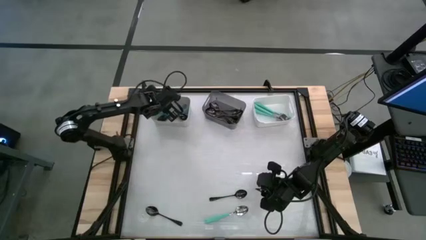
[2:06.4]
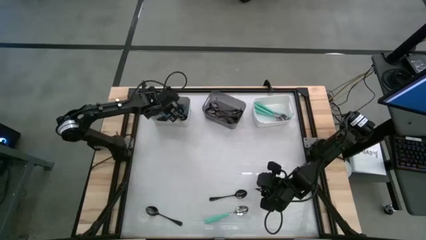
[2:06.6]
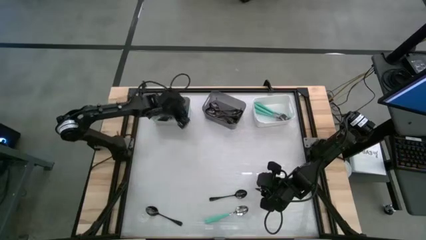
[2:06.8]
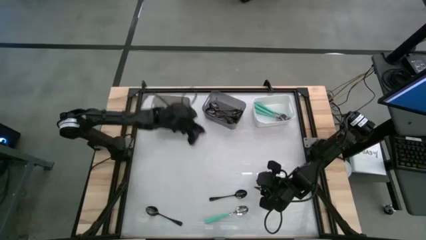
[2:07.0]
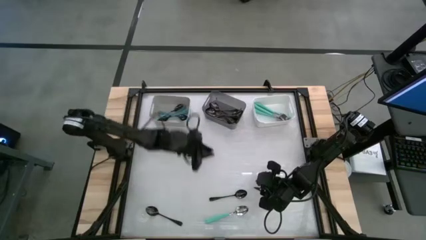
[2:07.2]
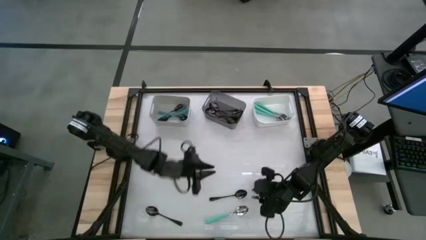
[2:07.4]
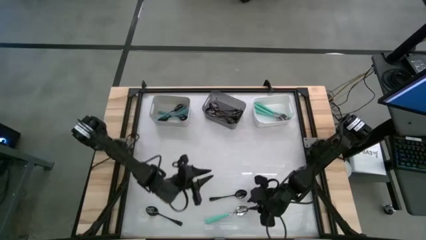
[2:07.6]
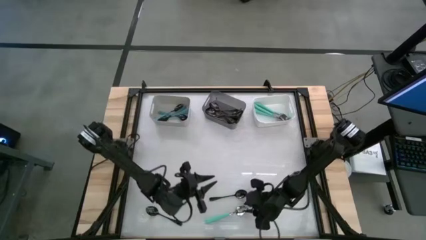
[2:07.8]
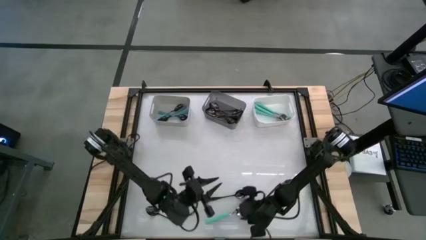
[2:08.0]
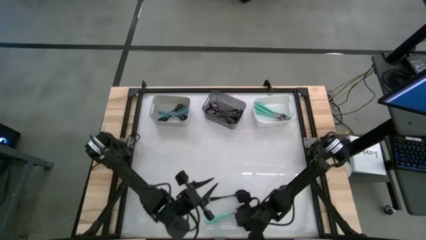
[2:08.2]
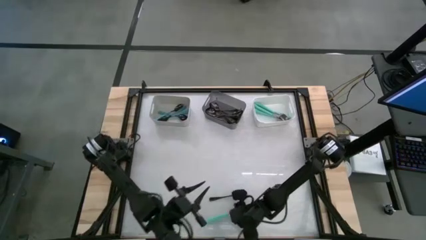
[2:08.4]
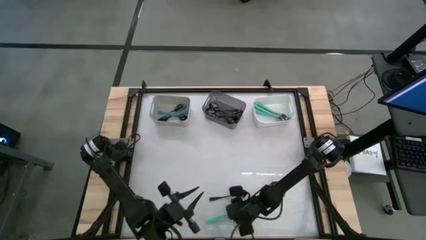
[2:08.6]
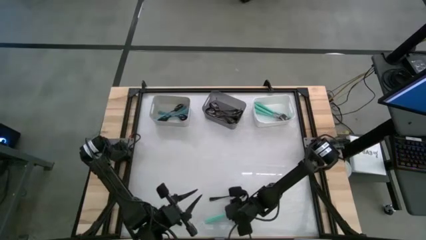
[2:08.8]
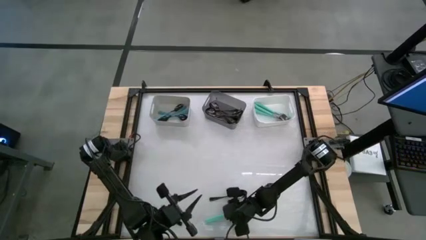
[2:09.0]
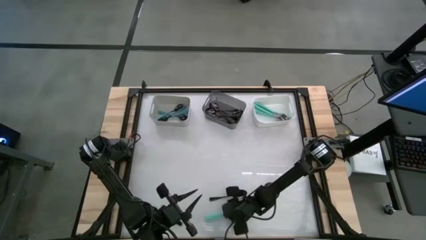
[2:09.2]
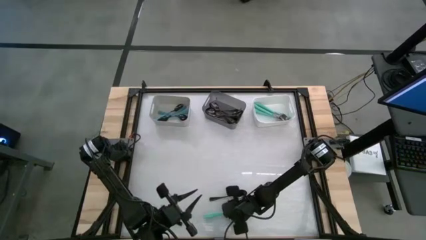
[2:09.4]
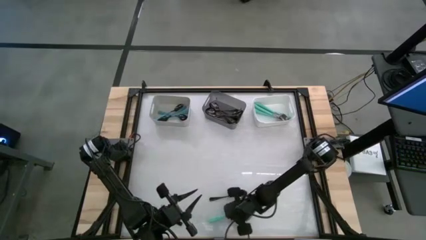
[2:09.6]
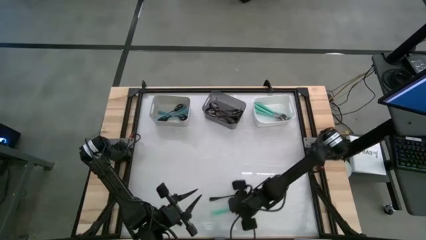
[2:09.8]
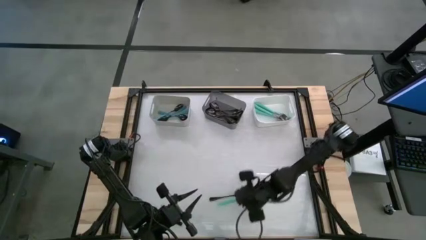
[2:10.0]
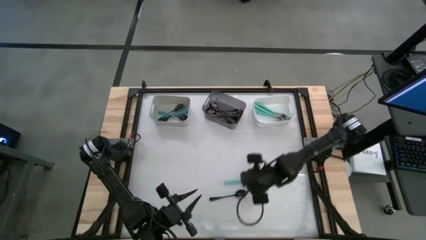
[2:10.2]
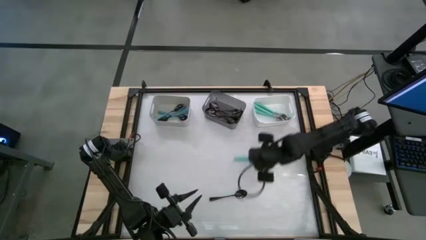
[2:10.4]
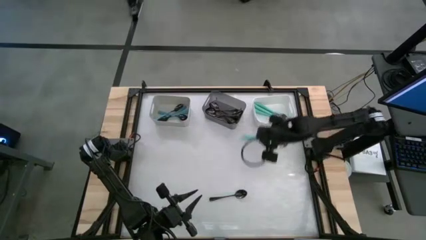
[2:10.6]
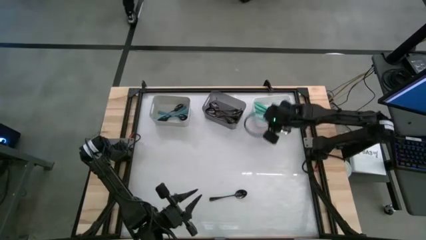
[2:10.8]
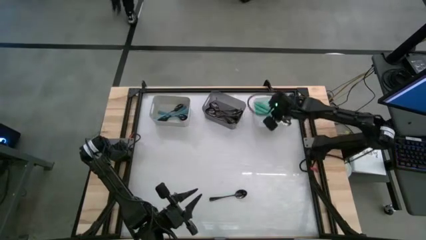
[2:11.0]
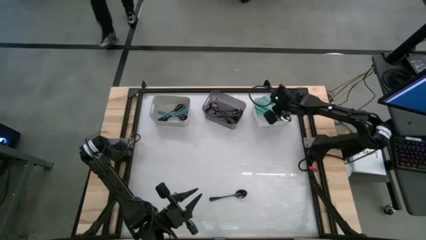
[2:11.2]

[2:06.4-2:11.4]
Task: Sort silverware by color (type)
Put the green spoon into the white bin

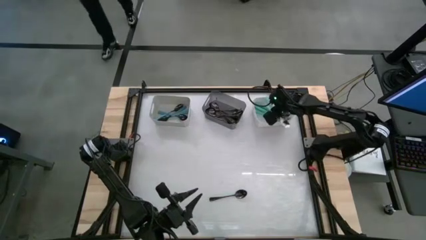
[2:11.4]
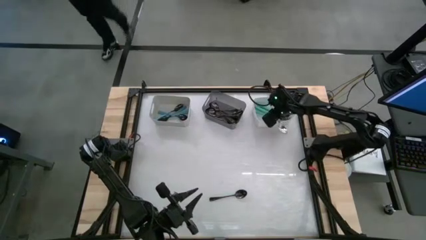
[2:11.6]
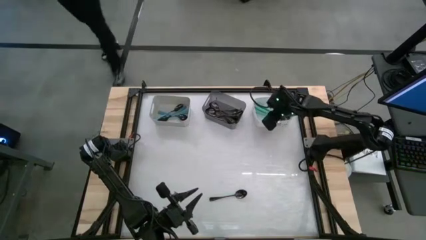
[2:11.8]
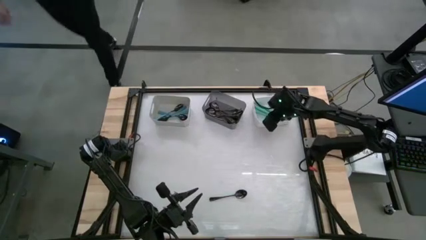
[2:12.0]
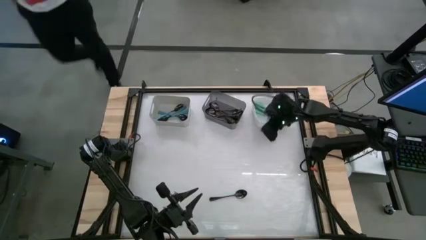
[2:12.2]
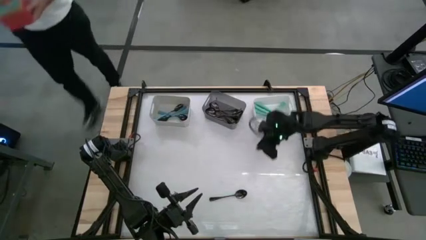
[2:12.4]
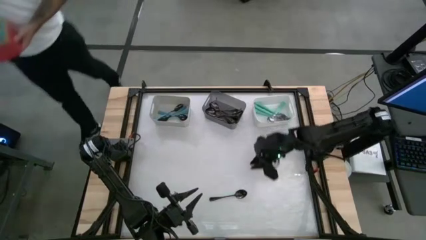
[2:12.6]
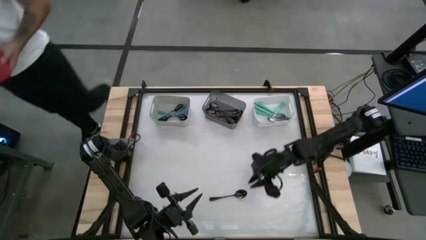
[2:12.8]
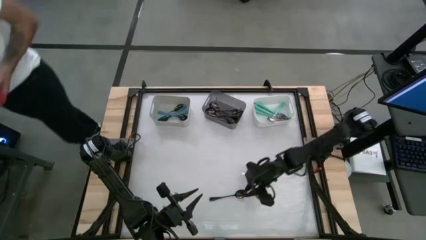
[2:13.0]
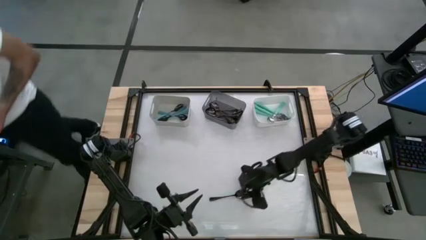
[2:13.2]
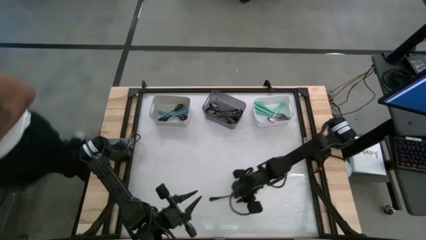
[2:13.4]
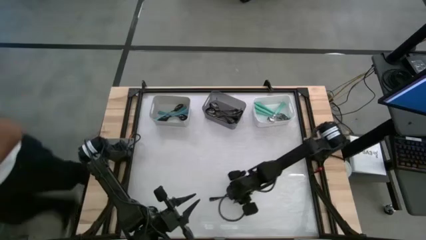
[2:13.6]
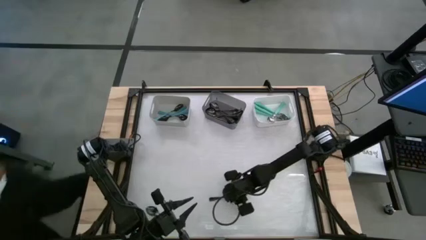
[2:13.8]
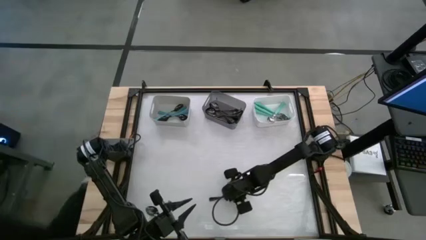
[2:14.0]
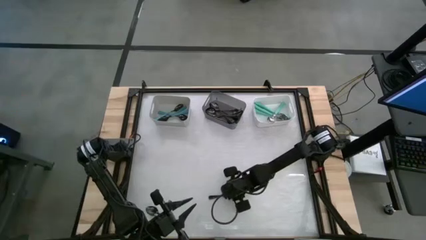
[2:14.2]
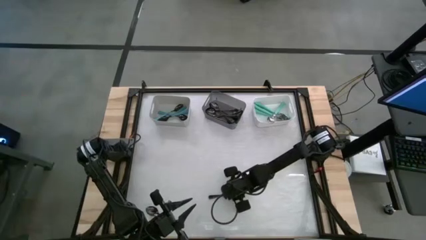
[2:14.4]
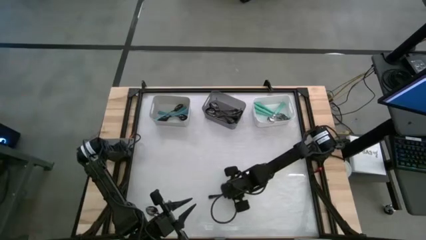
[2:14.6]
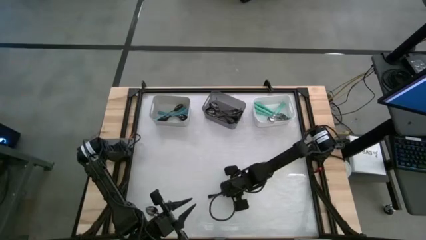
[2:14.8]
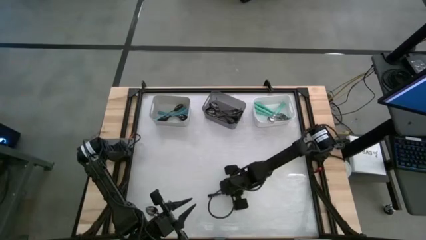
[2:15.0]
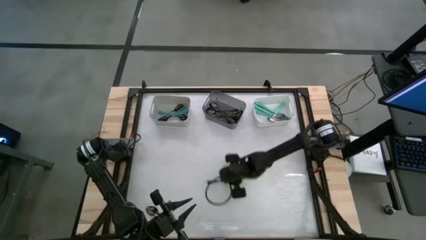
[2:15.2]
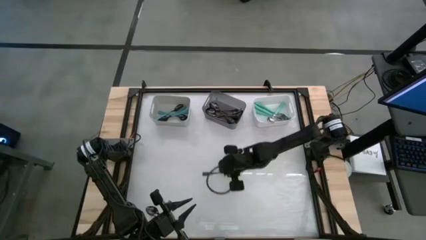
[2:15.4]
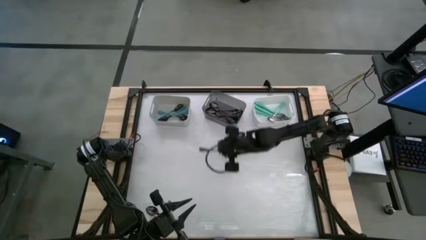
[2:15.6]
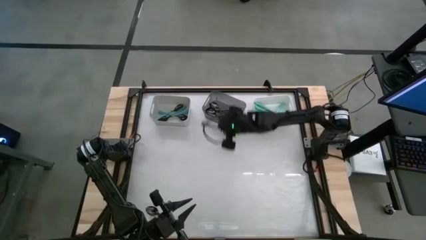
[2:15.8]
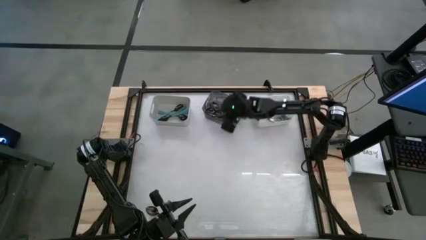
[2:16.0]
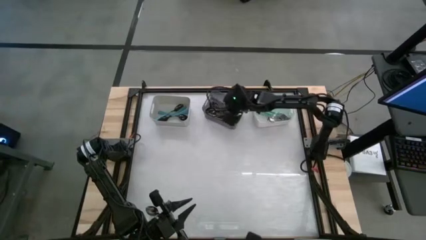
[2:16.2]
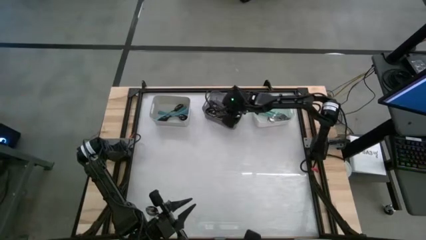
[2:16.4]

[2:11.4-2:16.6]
Put the black spoon into the black bin

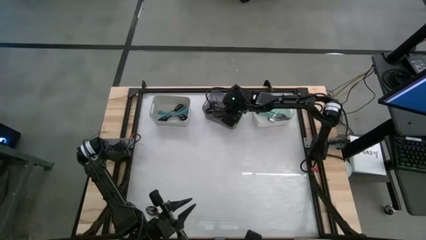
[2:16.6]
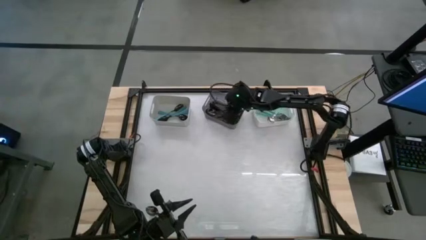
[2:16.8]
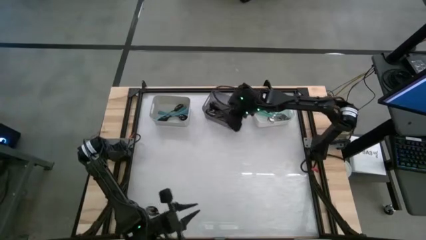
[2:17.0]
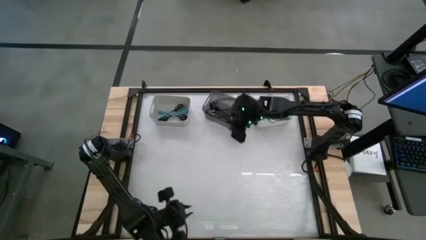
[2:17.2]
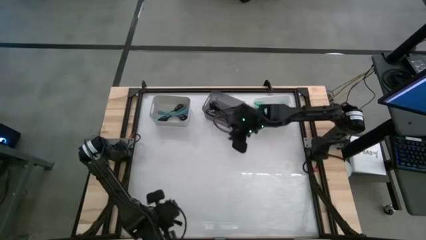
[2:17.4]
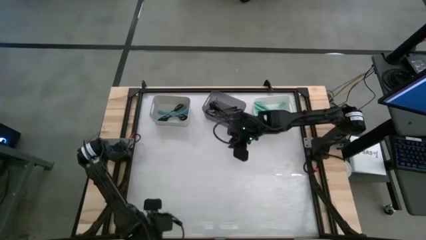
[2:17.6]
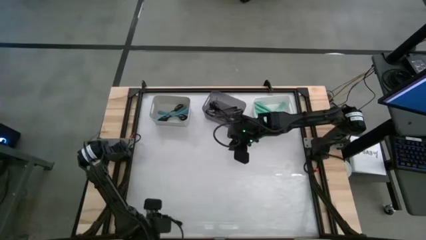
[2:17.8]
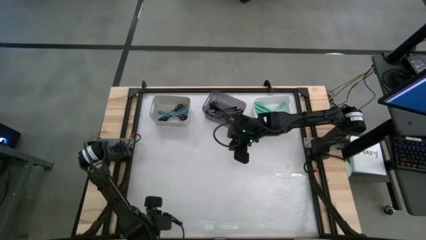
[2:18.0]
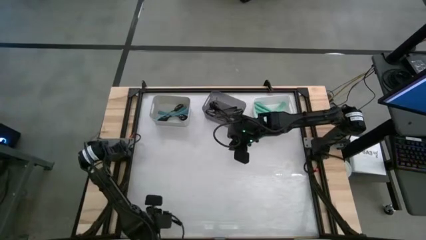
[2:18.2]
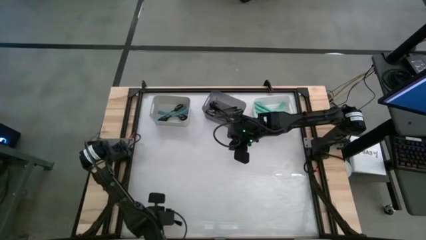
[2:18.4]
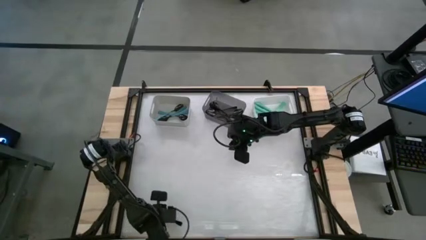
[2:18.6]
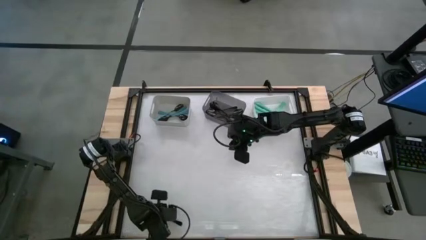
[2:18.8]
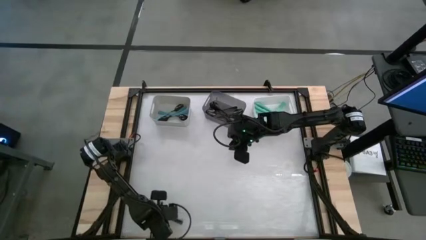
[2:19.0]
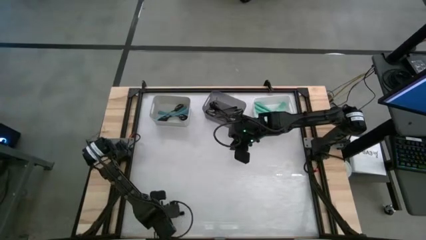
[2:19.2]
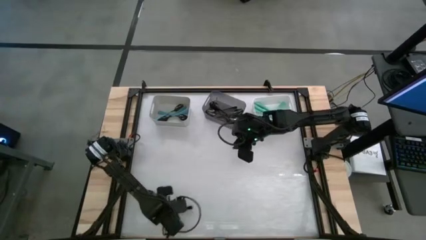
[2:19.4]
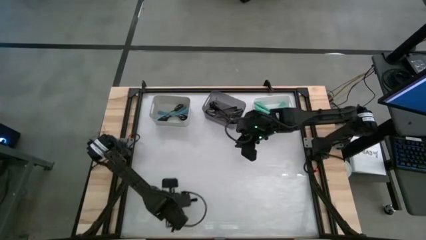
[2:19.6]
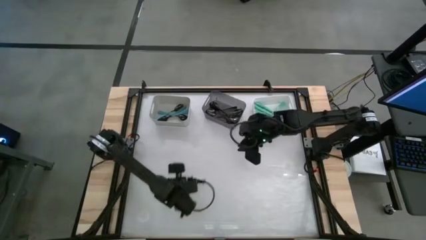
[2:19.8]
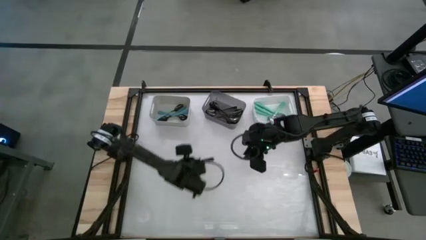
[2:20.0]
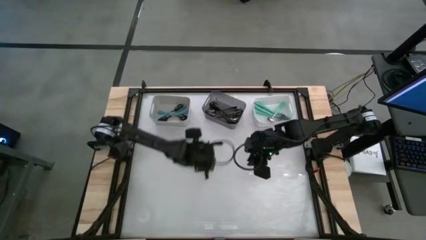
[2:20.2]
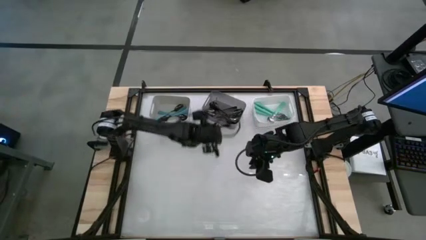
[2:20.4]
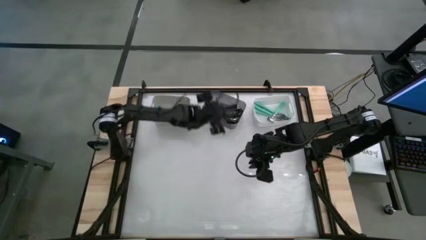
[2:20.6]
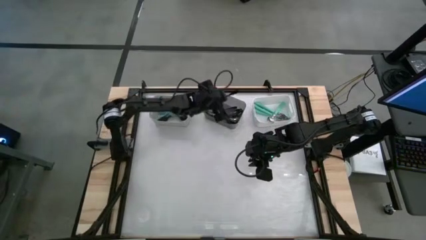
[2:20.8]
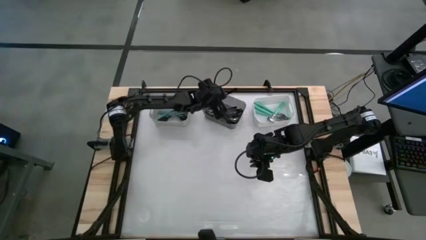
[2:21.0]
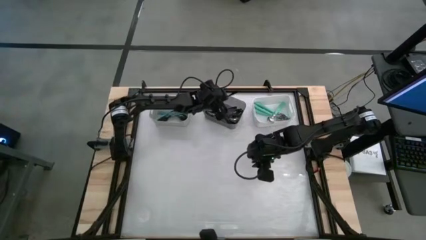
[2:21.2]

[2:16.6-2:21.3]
Put the black spoon into the black bin
